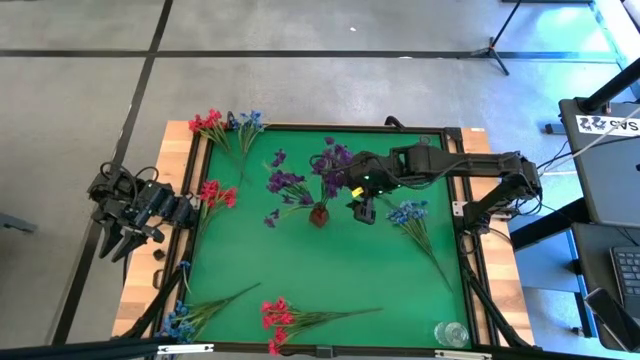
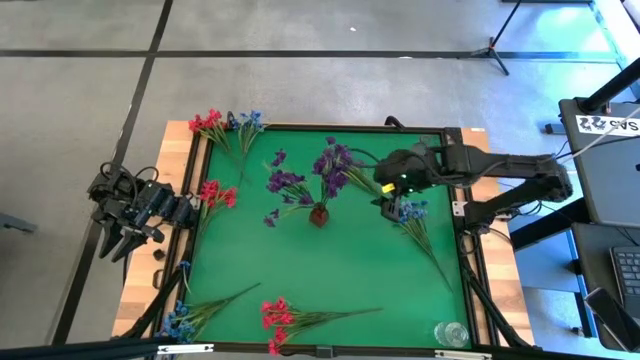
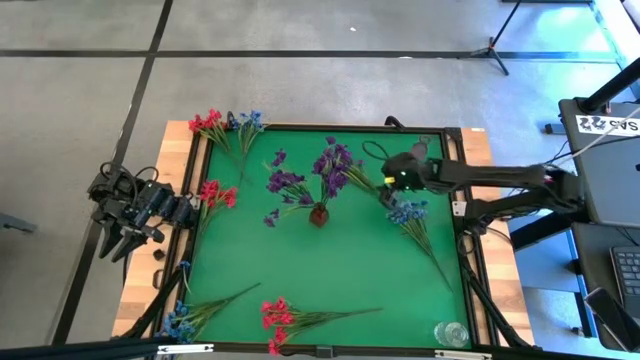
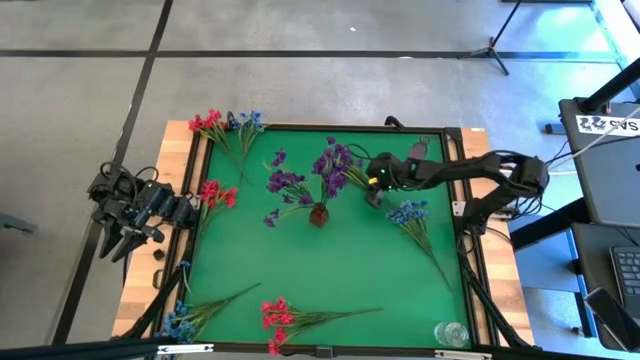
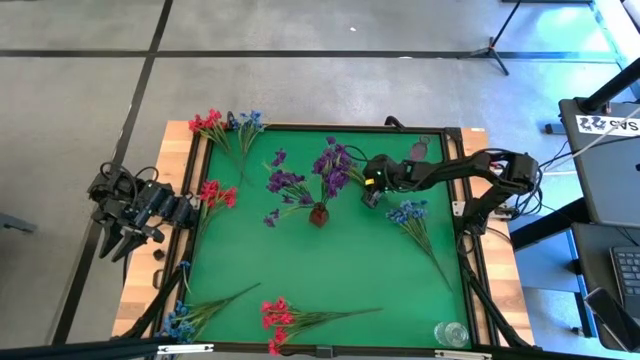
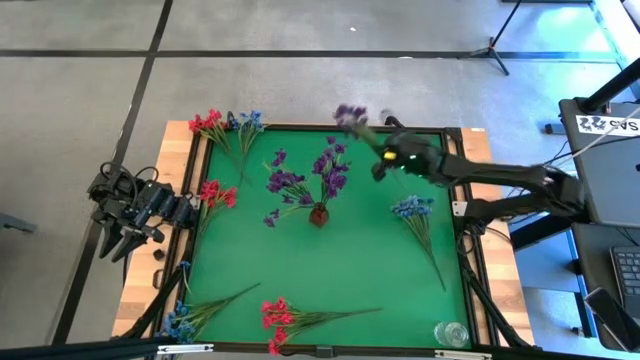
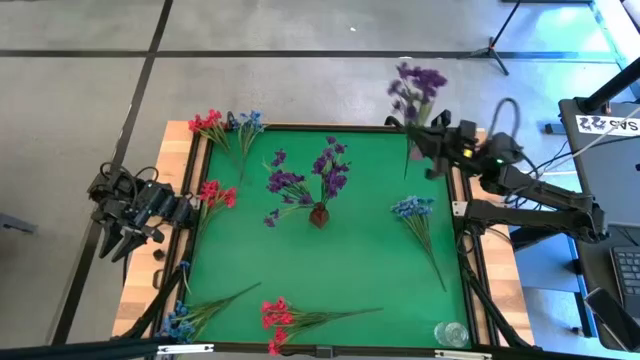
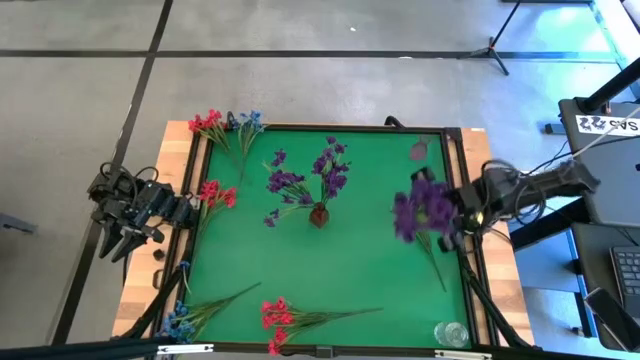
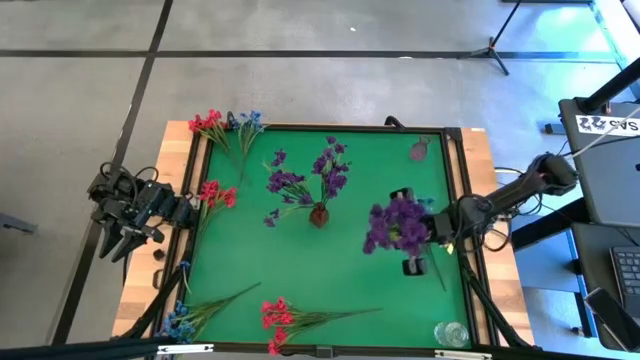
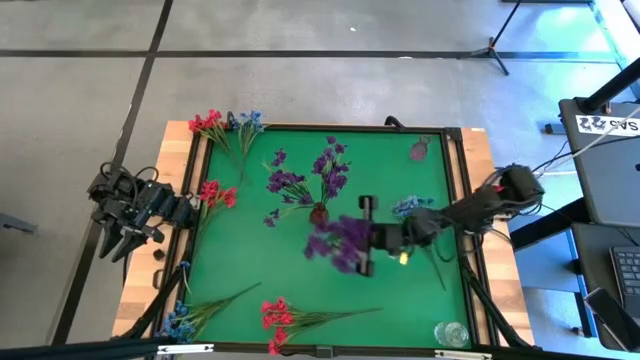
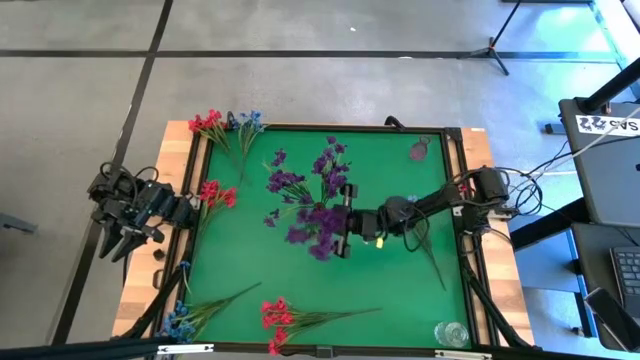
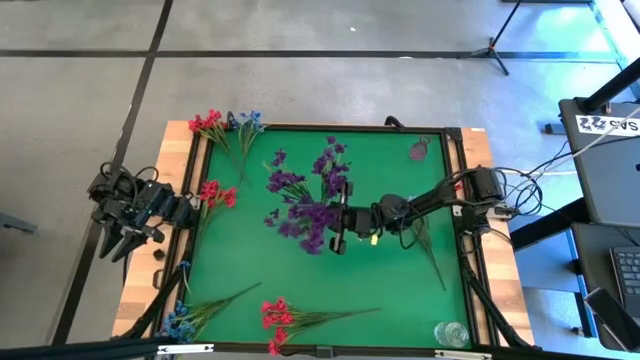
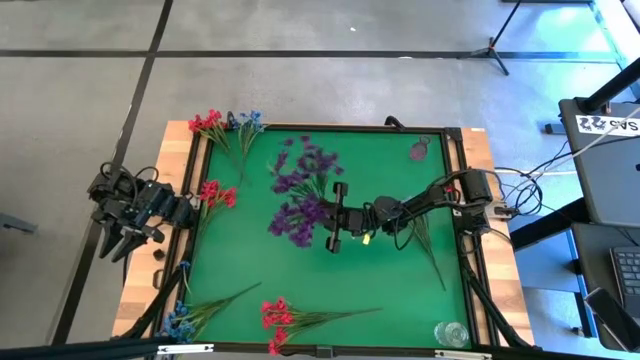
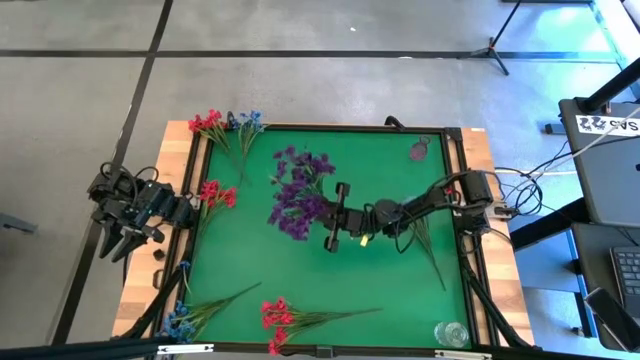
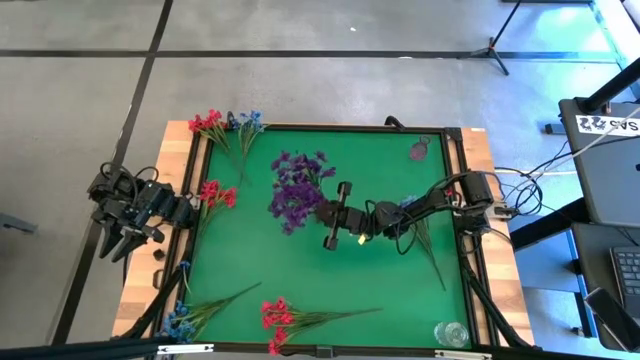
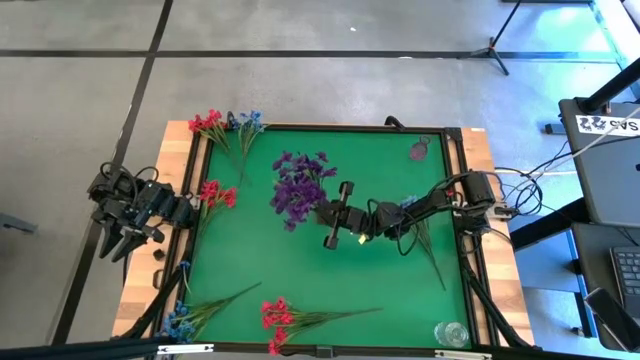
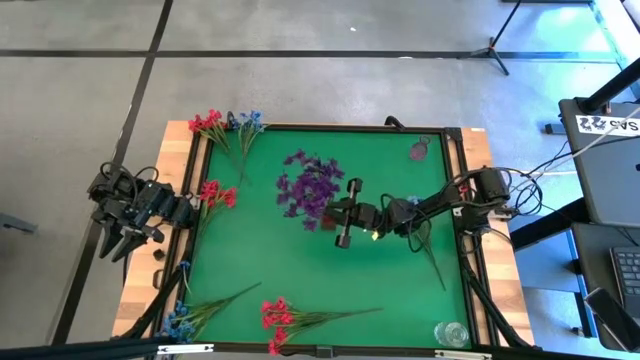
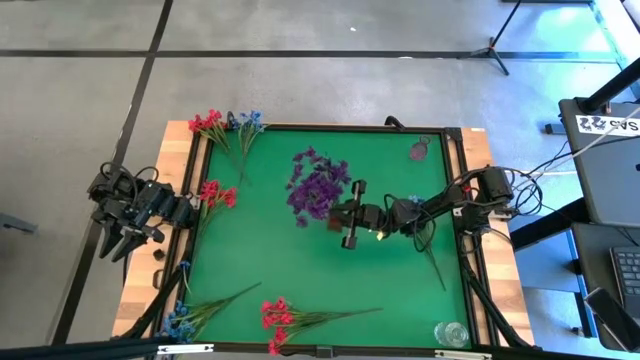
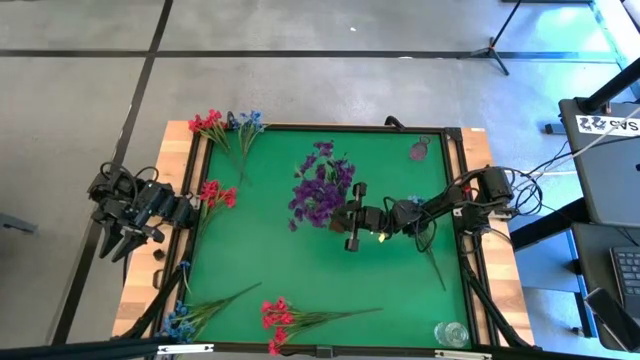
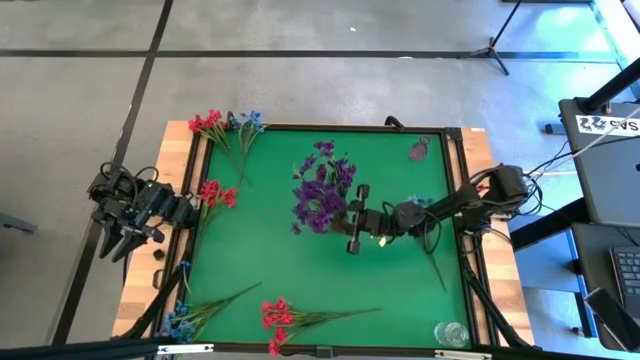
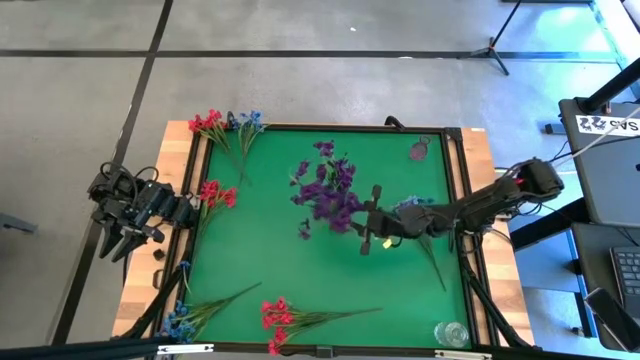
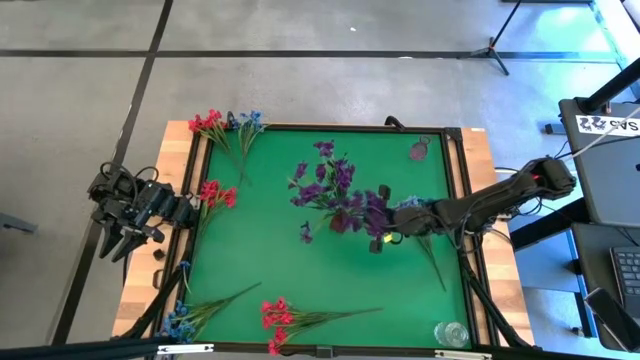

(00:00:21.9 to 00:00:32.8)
Task: Sort flowers into vase by color
Put the violet flowers into the red vase

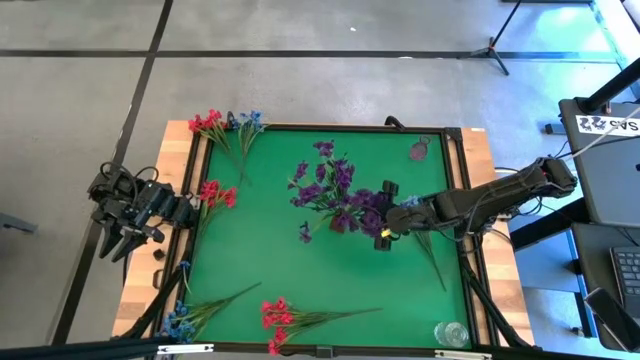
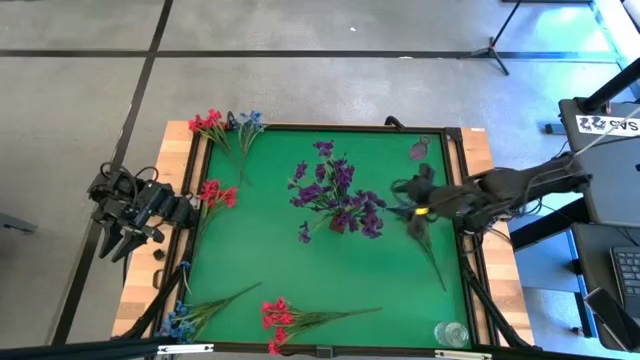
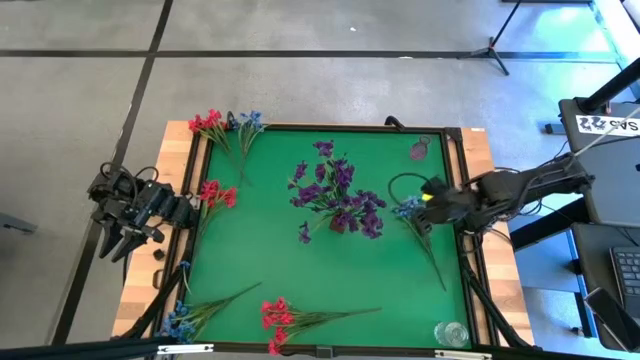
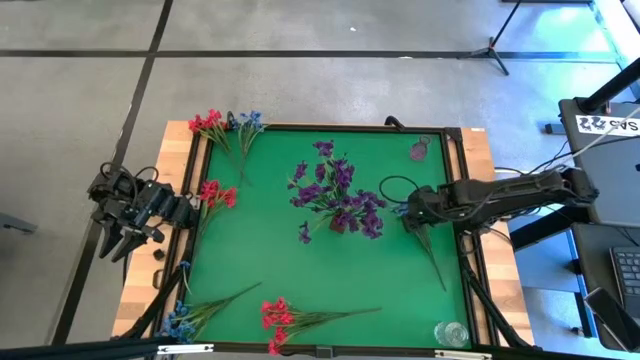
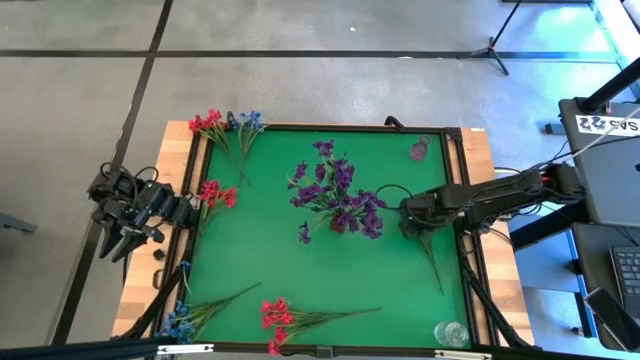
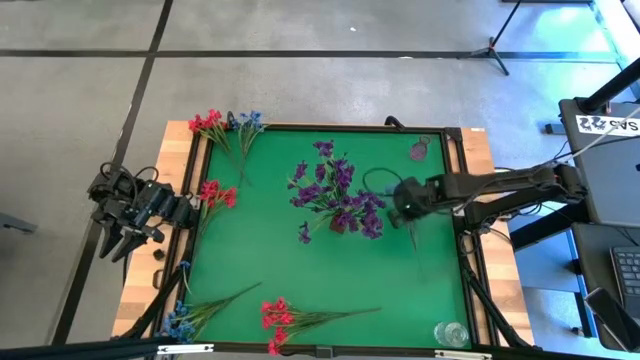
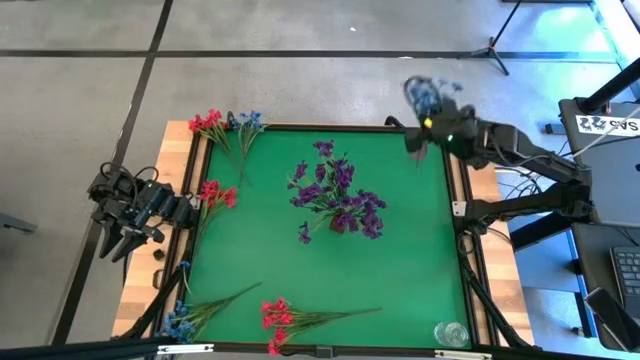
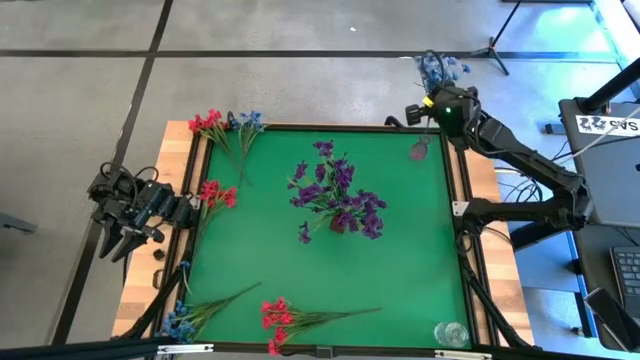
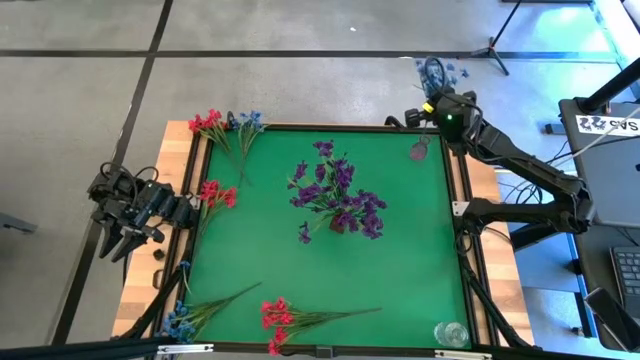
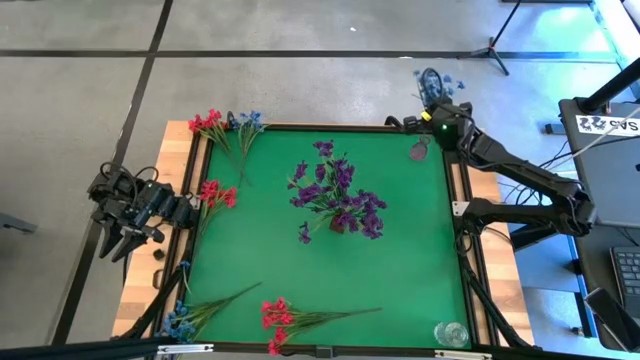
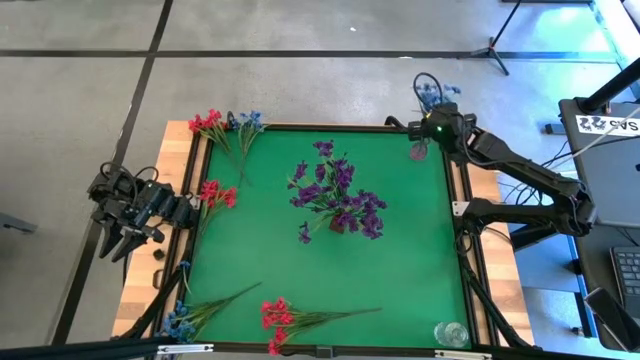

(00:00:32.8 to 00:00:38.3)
Put the middle blue flowers into the violet vase

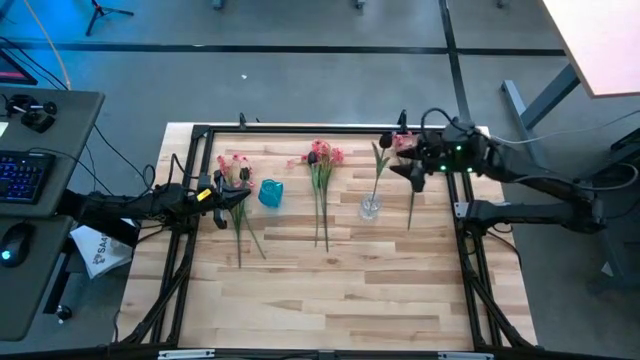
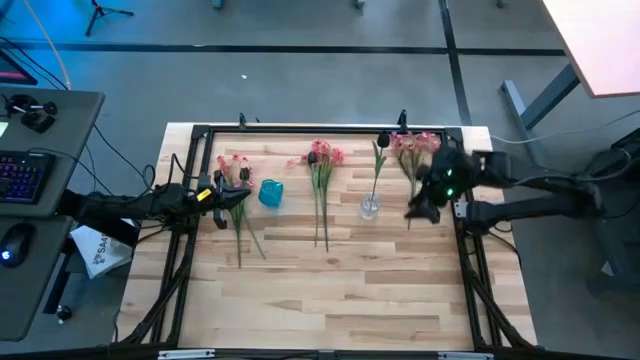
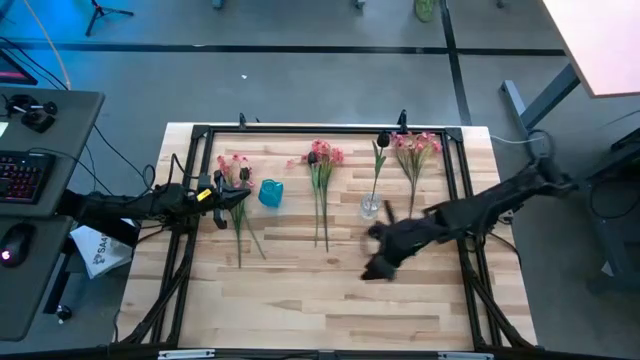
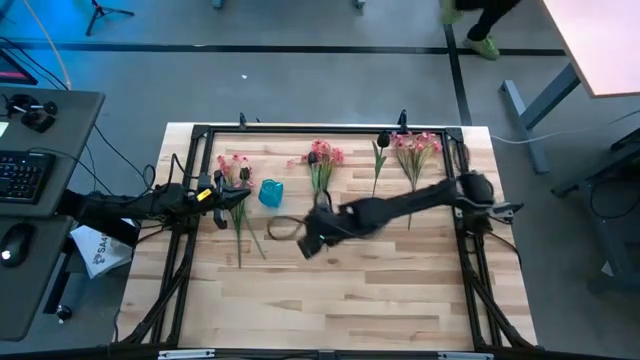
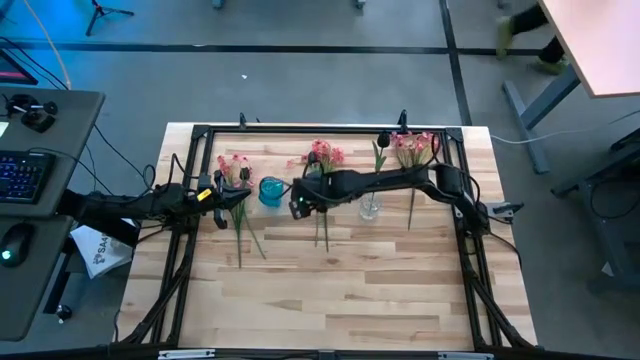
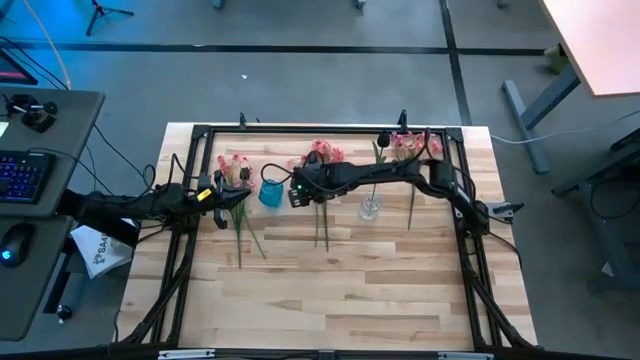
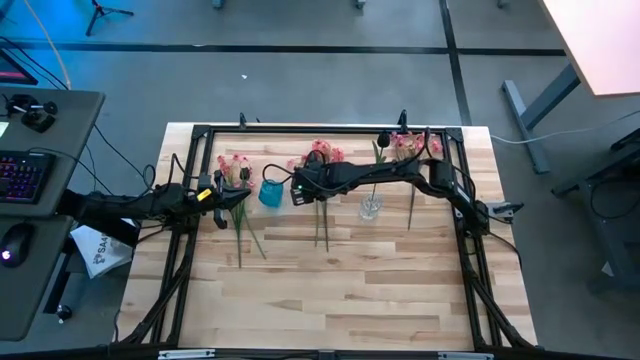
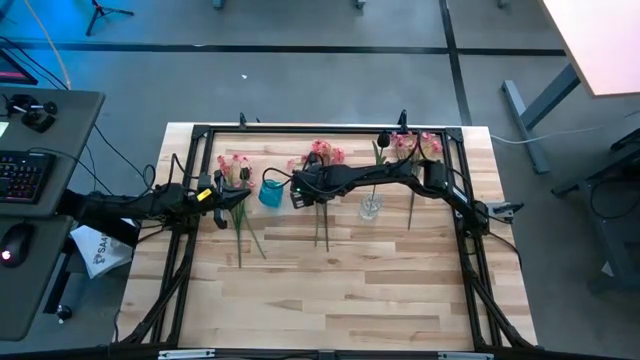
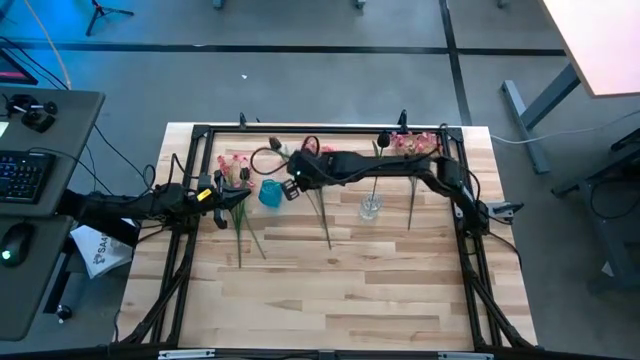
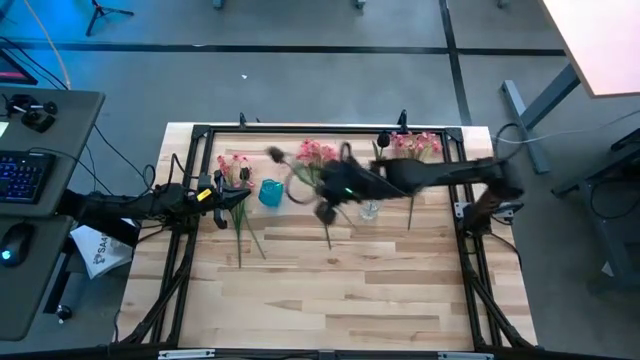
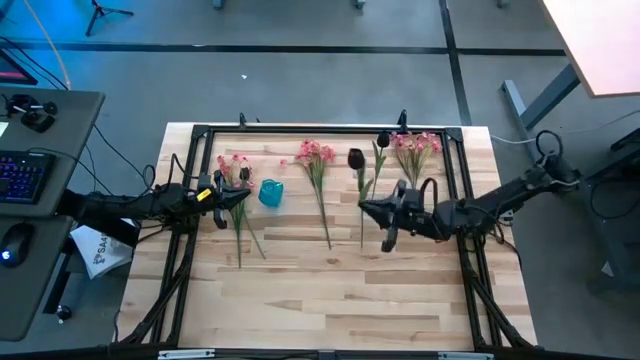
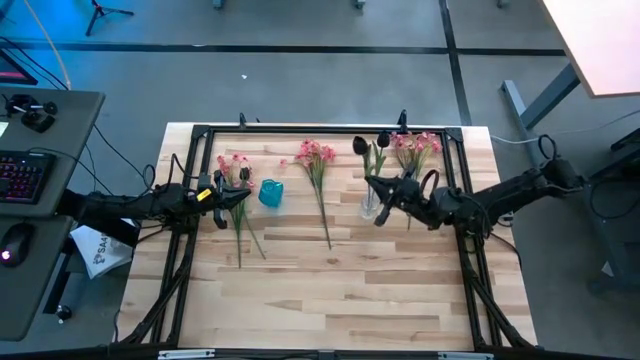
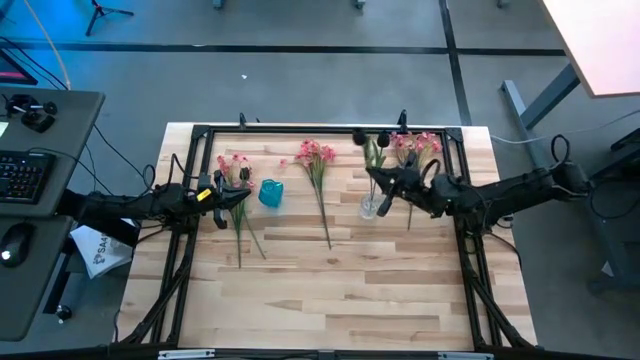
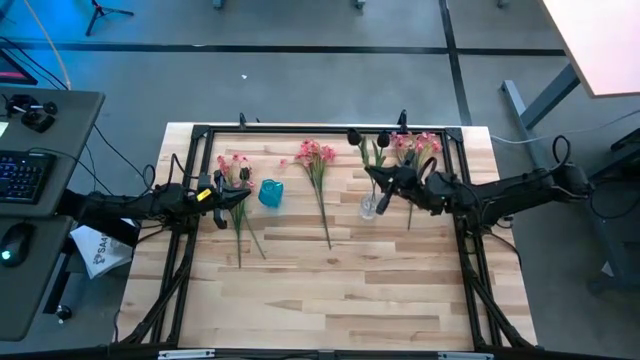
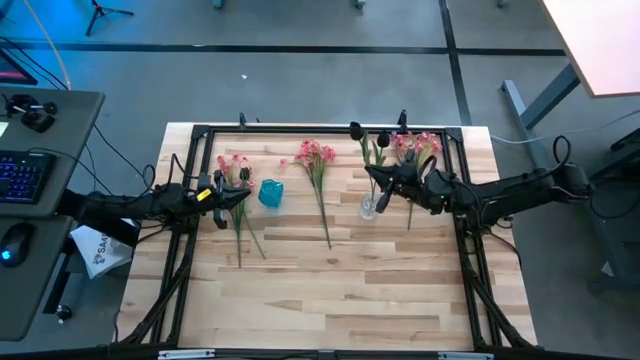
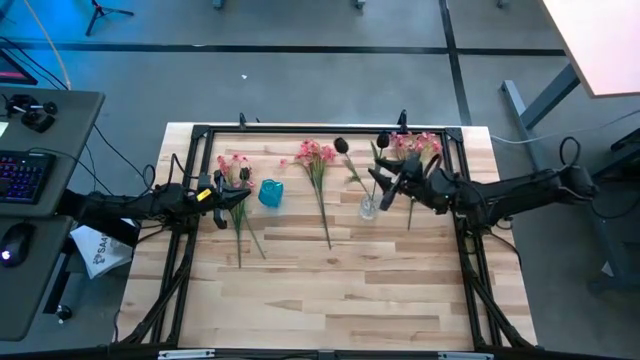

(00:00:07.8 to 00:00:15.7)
Task: Sort flowers into vase by color
Put the right black tulip flower into the transparent flower vase
